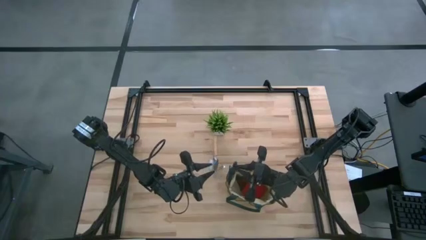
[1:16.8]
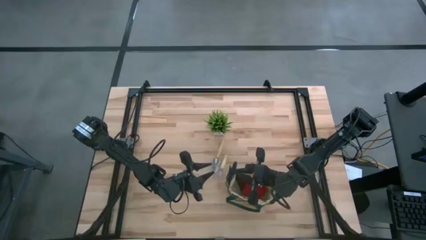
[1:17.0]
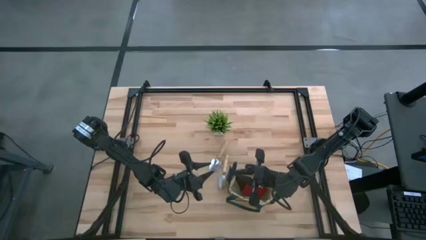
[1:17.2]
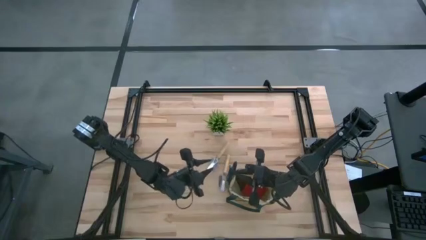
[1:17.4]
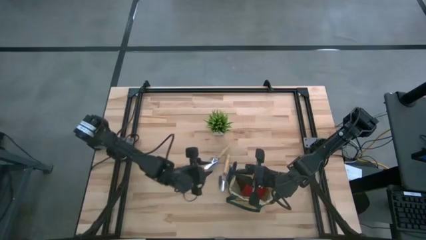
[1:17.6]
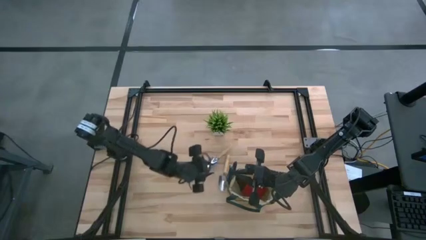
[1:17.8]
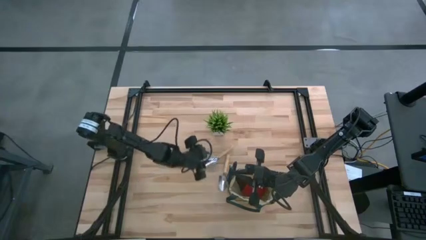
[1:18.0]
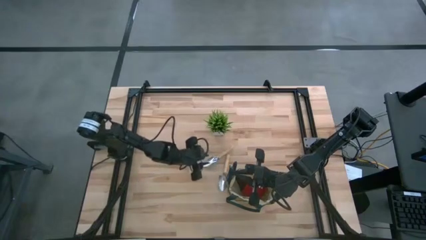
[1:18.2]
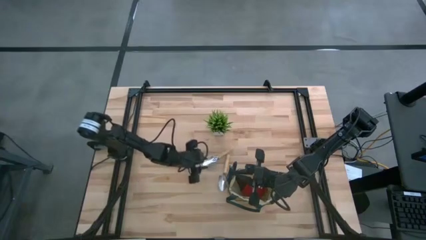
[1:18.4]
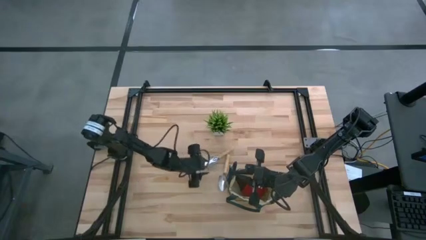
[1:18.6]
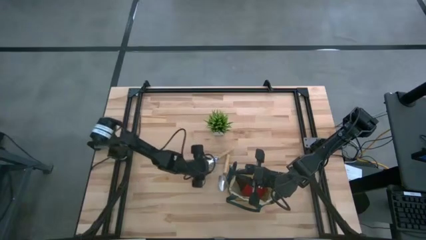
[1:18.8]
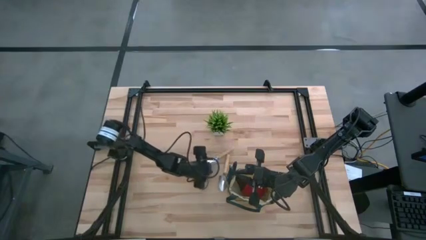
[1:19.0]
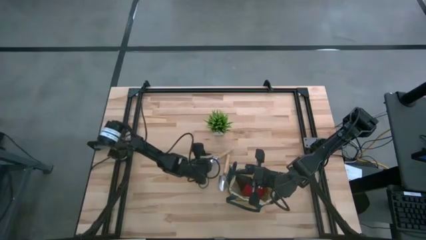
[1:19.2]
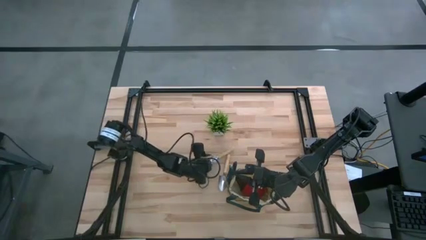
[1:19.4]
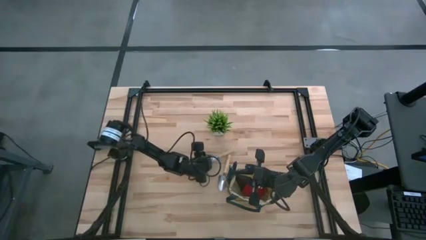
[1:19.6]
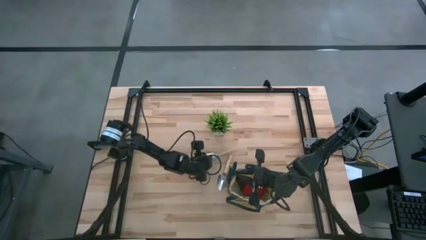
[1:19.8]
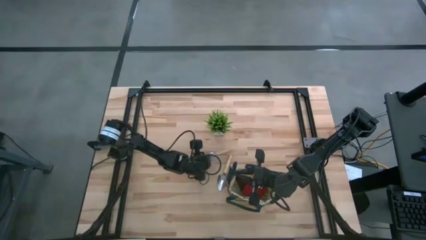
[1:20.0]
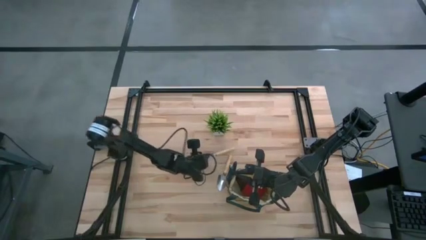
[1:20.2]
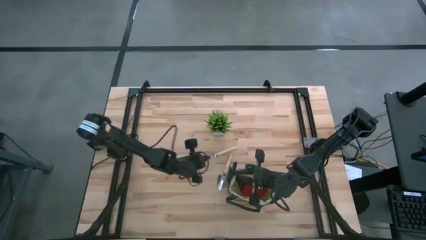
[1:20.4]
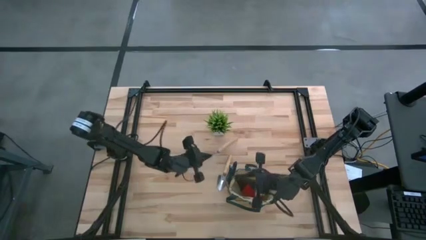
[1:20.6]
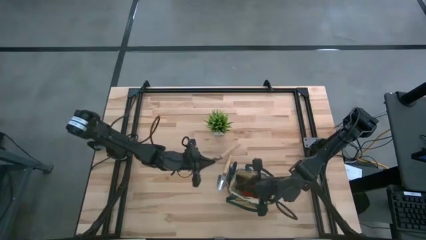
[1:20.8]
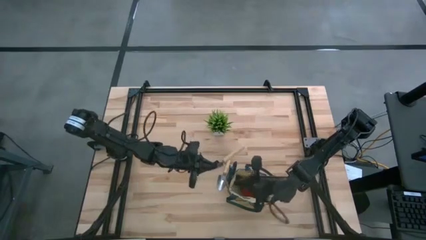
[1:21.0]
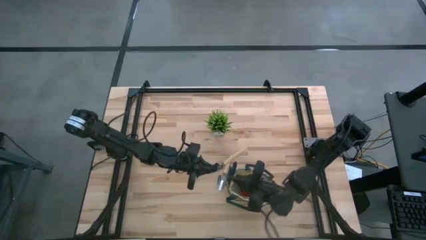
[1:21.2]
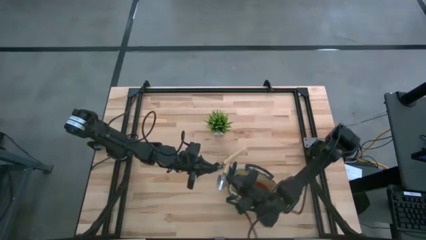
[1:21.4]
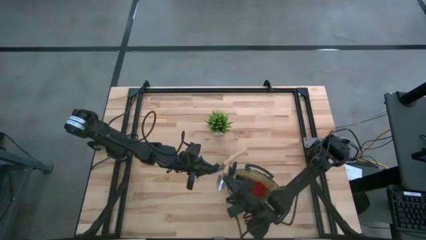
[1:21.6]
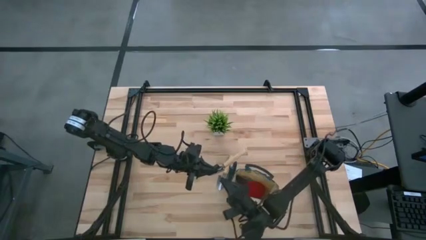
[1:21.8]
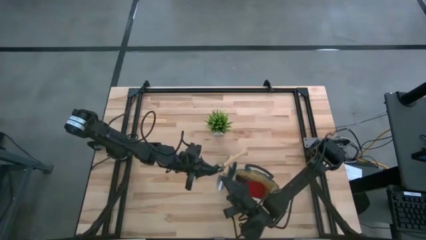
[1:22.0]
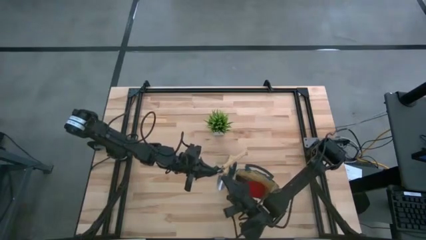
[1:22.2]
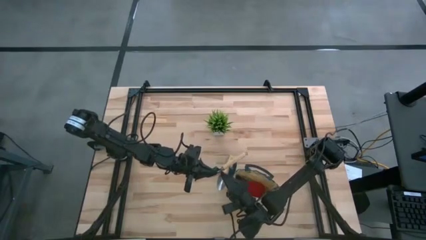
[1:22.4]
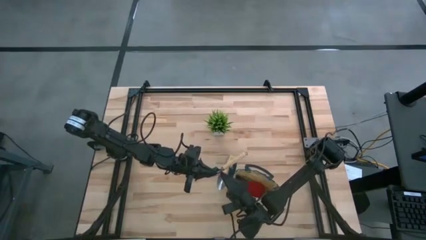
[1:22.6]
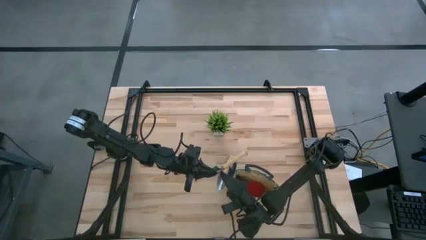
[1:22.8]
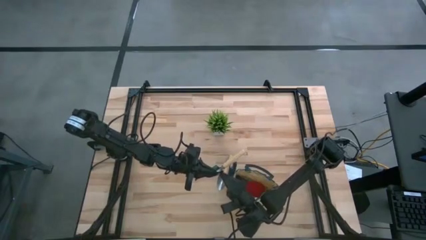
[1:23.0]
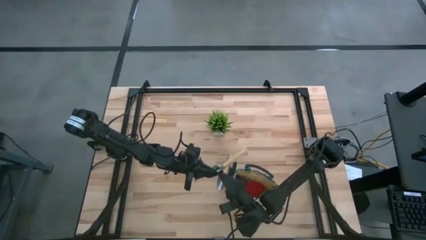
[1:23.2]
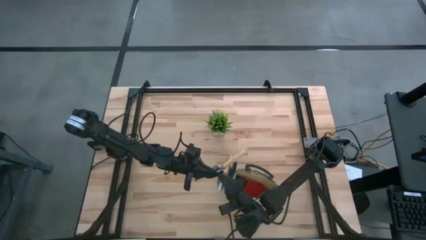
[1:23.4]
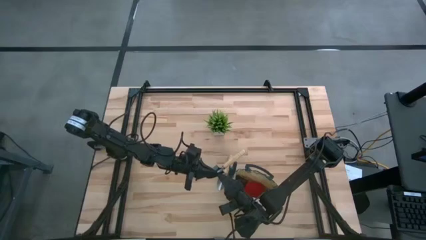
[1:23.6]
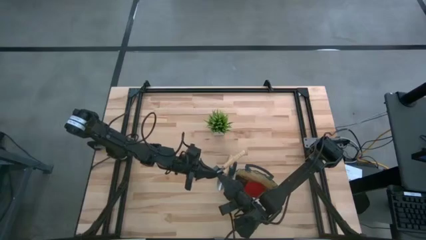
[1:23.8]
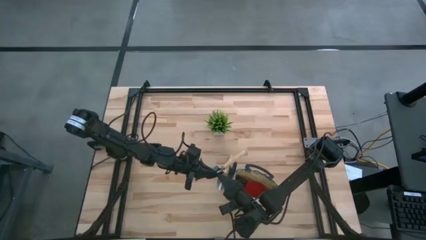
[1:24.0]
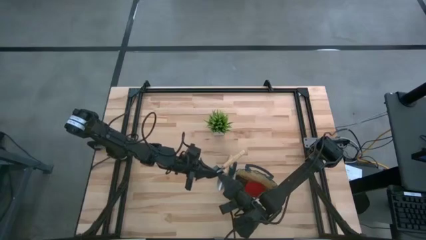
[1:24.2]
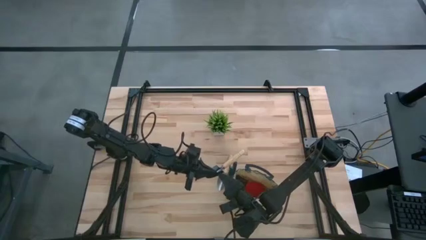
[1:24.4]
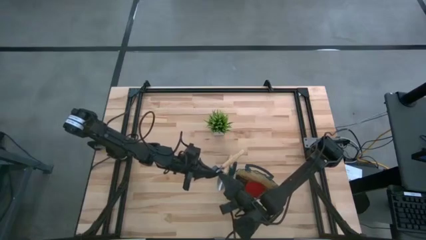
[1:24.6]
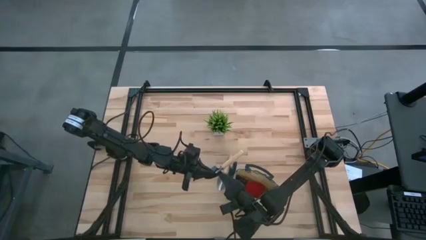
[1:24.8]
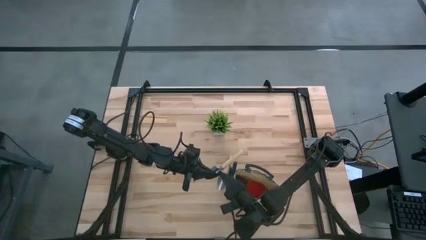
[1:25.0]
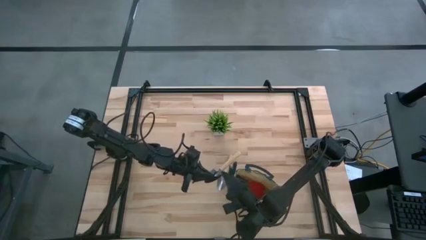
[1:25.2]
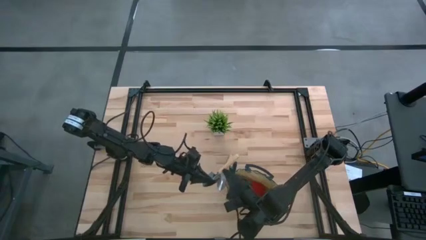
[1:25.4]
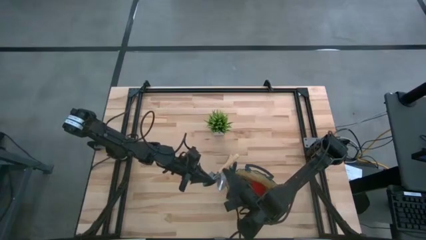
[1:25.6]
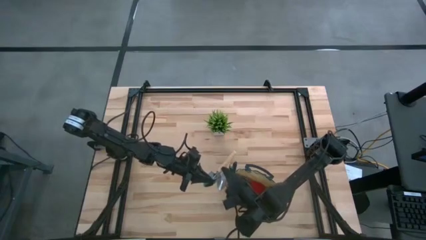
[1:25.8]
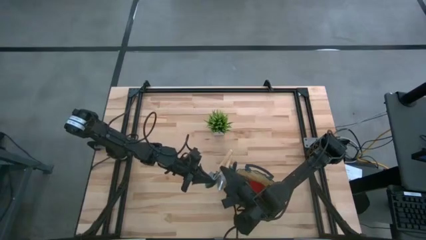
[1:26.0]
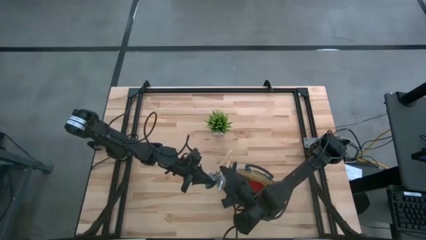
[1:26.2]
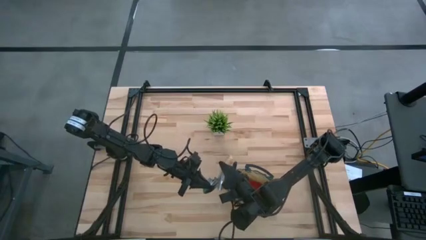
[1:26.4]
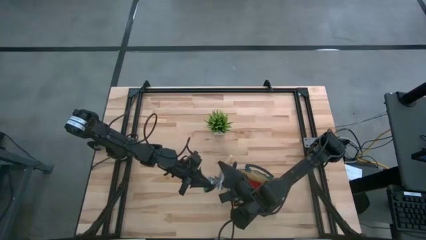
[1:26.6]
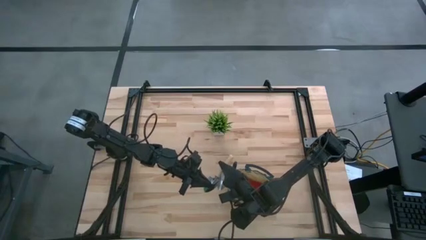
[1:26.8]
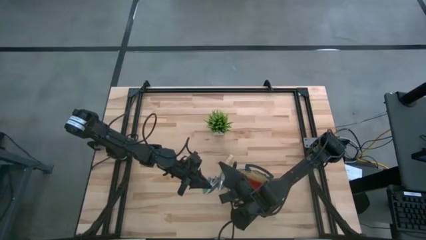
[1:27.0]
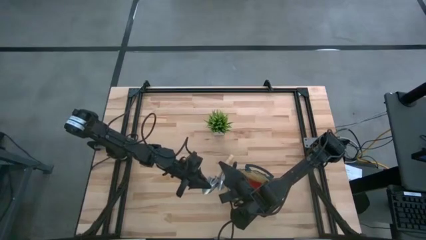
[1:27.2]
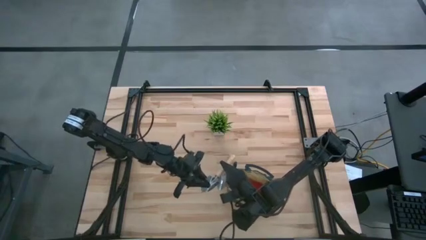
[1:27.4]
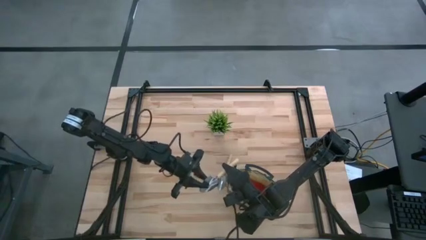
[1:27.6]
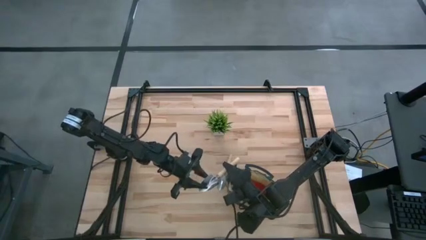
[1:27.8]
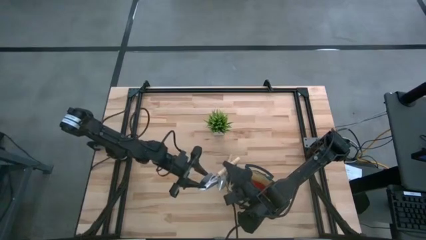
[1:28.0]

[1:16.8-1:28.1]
Task: Pick & Place Garden tools in Gardening bag
Put the brown trowel into the green gardening bag

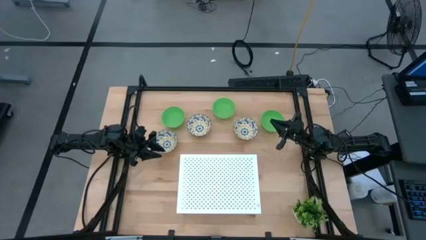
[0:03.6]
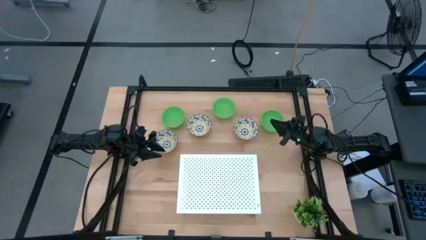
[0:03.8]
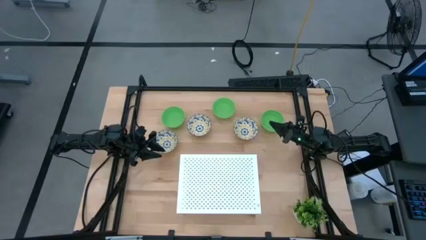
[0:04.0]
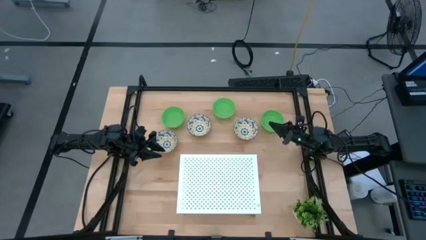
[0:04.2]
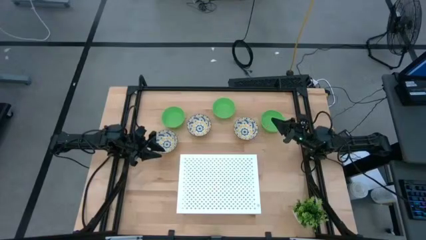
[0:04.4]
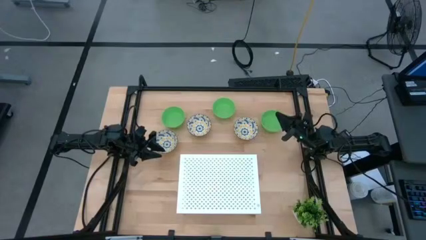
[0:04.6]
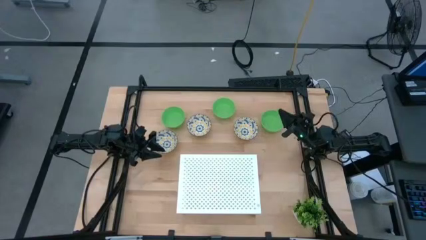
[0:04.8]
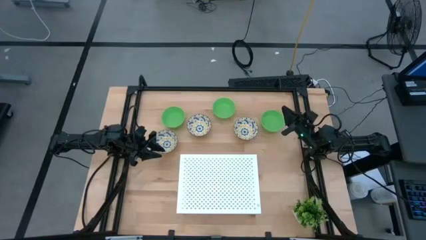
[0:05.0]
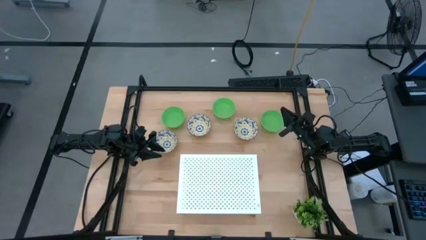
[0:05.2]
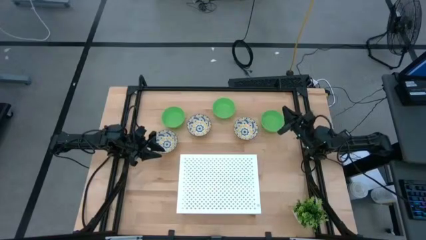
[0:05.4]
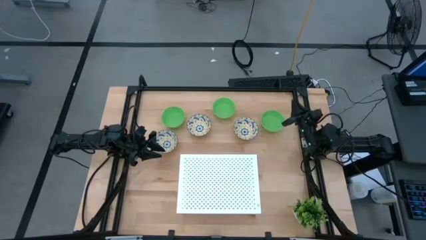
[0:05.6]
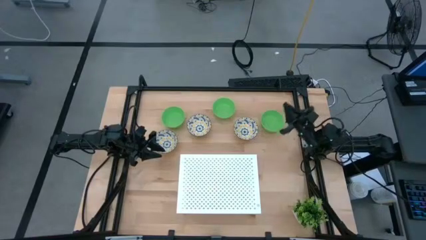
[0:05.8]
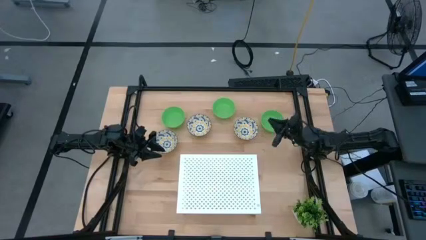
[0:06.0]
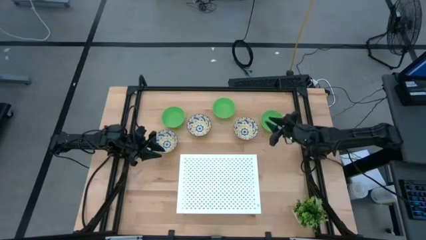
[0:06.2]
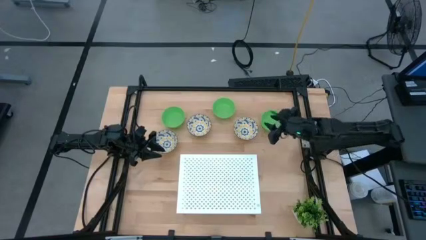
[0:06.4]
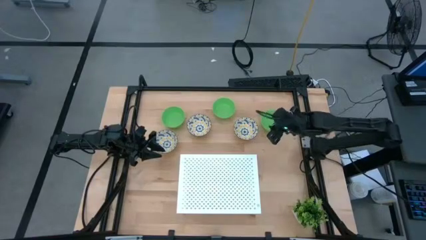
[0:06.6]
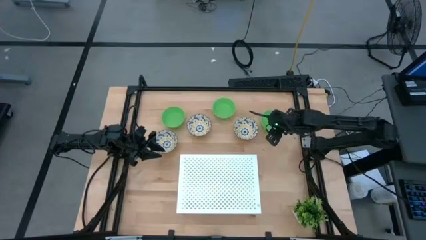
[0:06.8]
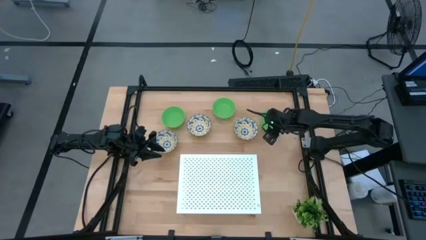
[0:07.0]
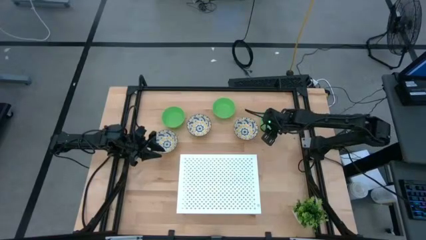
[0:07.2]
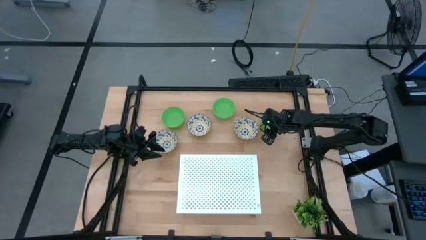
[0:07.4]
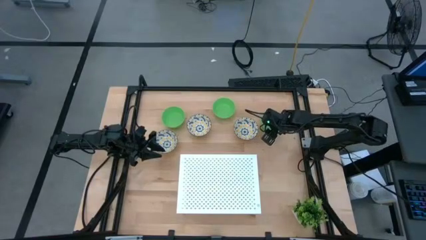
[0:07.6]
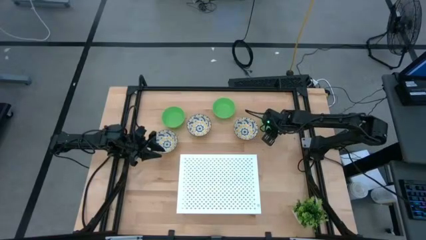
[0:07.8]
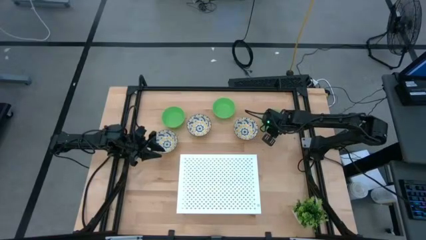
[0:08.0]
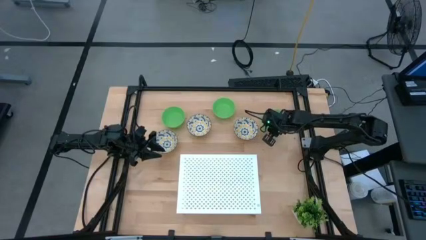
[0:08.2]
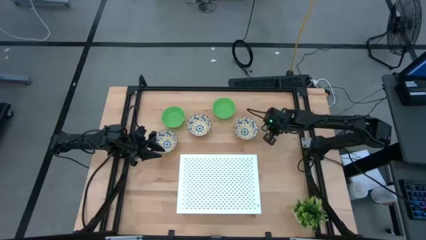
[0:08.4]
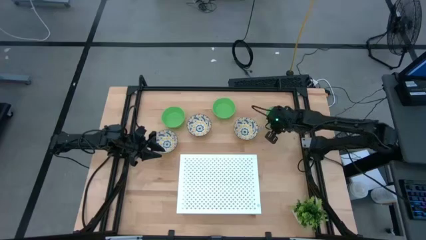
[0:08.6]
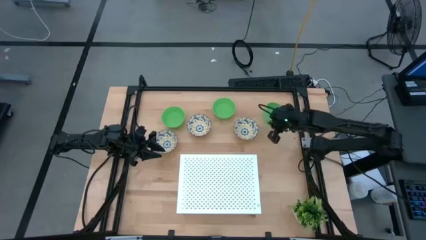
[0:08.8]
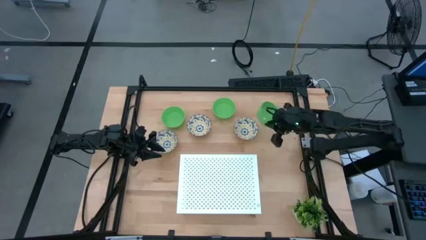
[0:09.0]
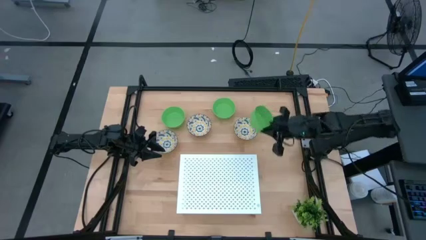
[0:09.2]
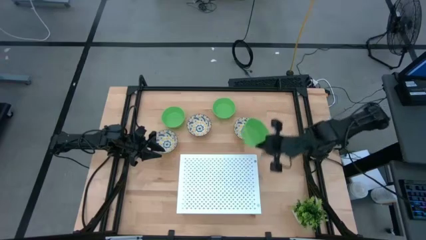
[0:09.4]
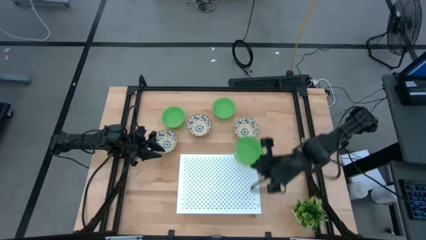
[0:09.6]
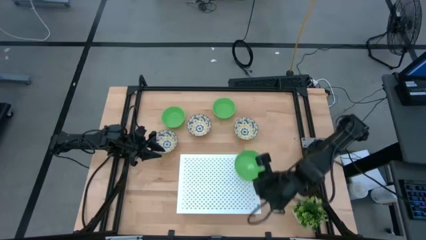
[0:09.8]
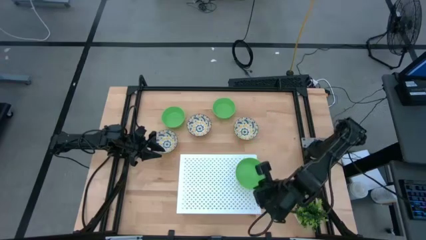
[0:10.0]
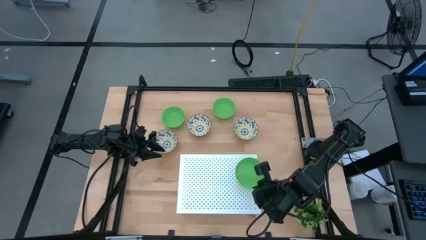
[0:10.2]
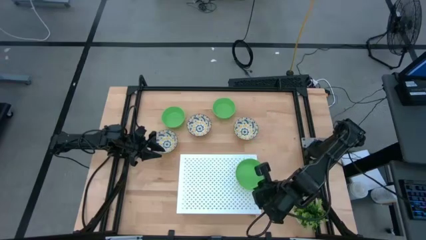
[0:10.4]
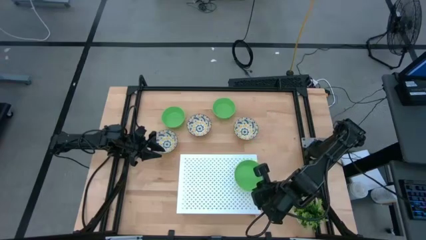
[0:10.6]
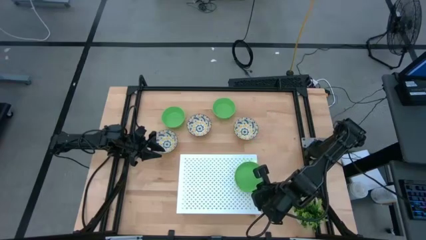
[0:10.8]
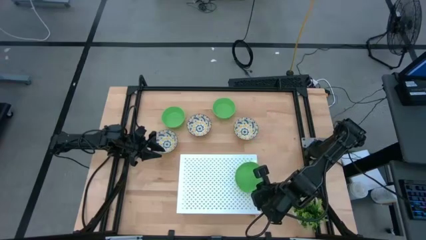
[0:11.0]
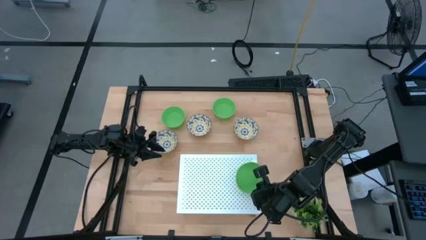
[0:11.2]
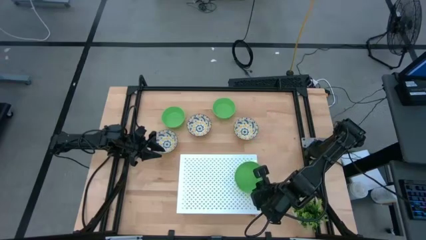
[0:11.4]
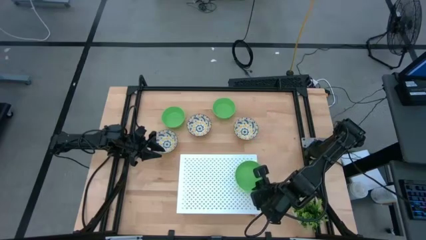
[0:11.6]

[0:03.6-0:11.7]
Task: Pick & Place Mini bowls
Put the right green bowl on the shelf
